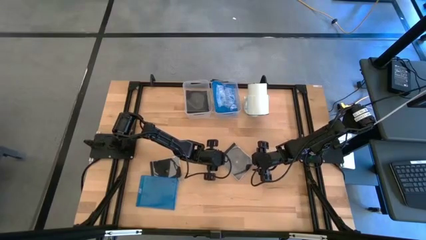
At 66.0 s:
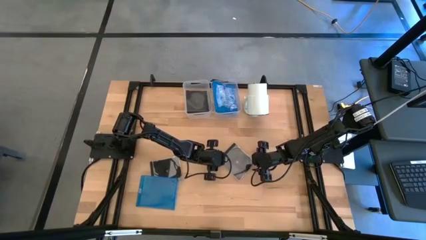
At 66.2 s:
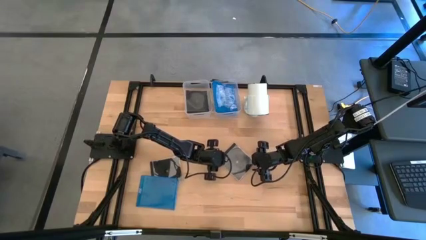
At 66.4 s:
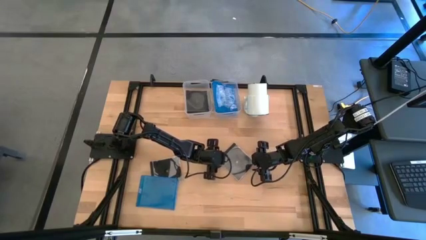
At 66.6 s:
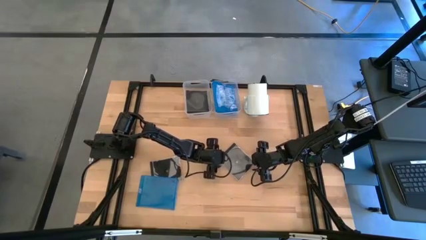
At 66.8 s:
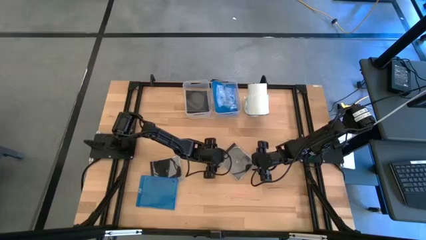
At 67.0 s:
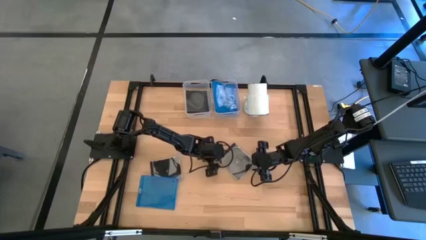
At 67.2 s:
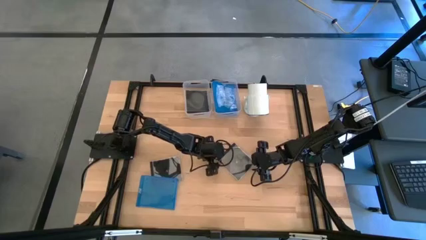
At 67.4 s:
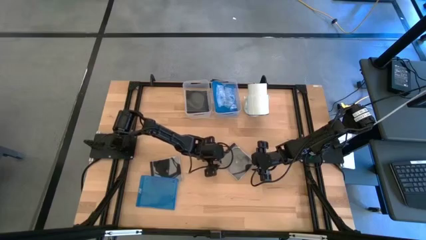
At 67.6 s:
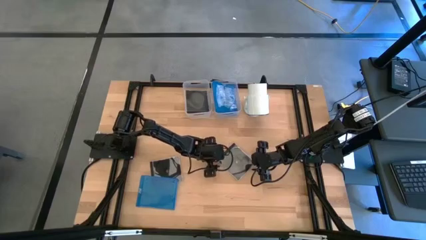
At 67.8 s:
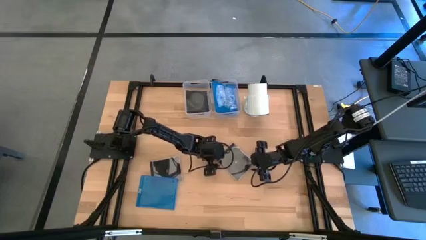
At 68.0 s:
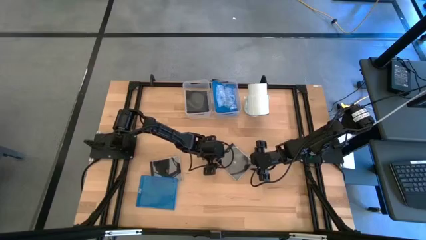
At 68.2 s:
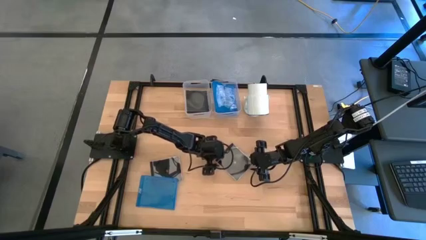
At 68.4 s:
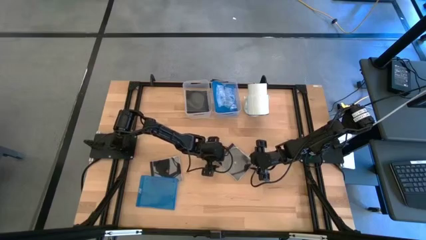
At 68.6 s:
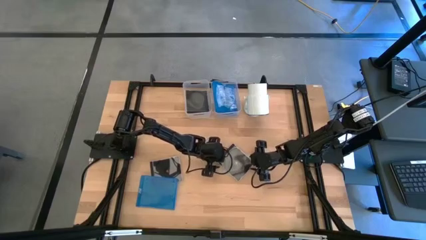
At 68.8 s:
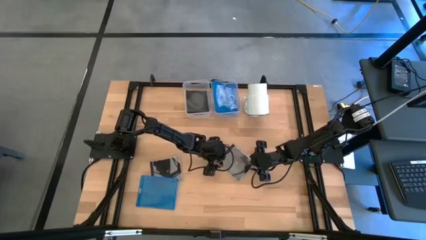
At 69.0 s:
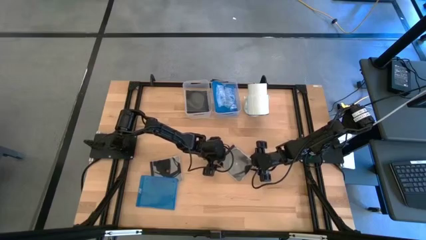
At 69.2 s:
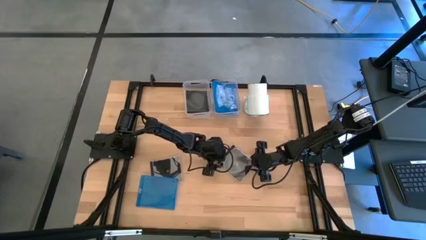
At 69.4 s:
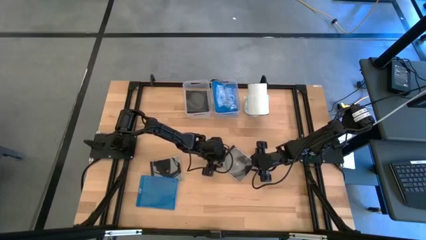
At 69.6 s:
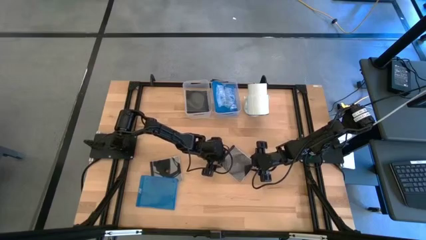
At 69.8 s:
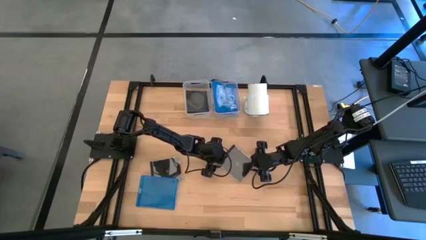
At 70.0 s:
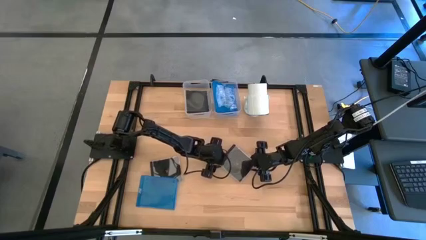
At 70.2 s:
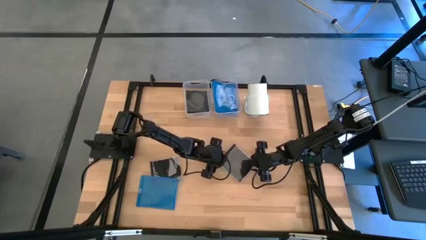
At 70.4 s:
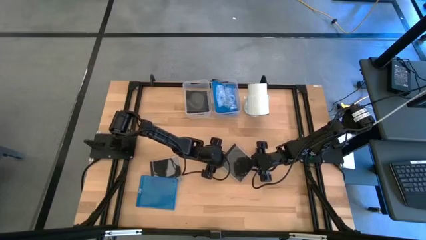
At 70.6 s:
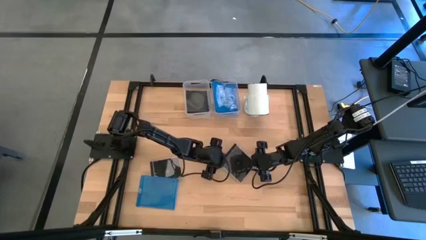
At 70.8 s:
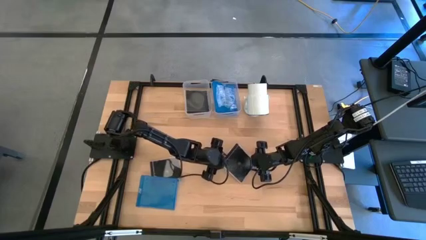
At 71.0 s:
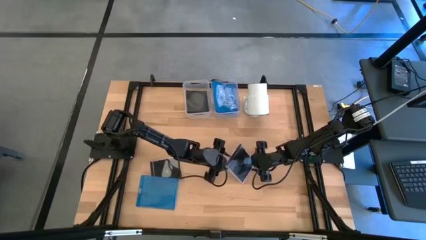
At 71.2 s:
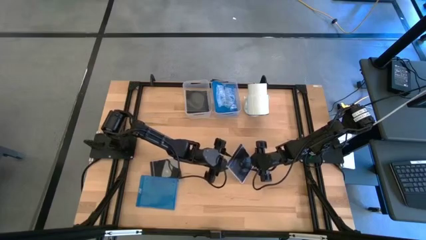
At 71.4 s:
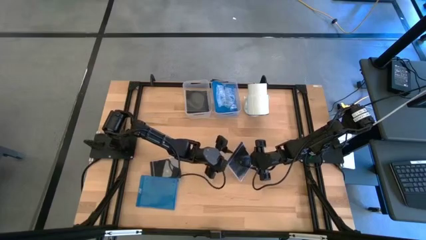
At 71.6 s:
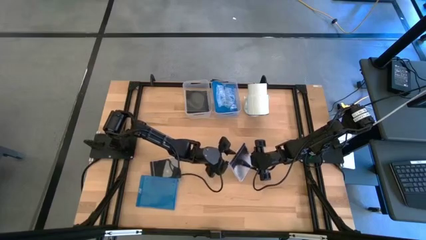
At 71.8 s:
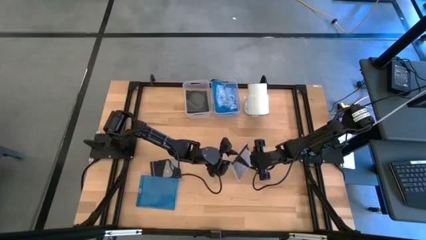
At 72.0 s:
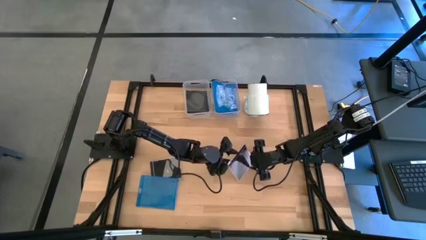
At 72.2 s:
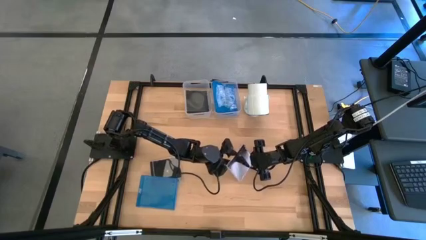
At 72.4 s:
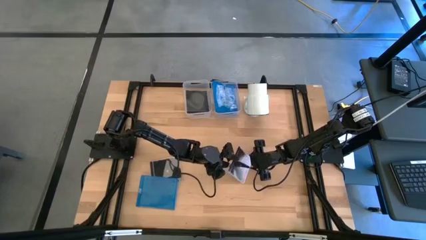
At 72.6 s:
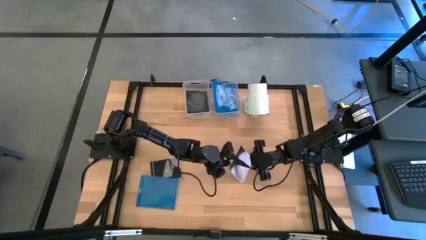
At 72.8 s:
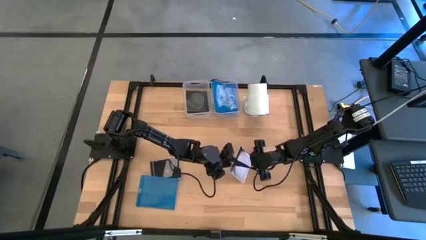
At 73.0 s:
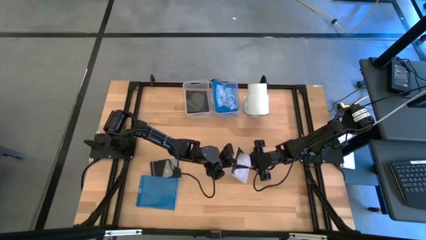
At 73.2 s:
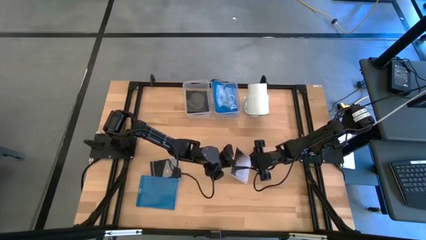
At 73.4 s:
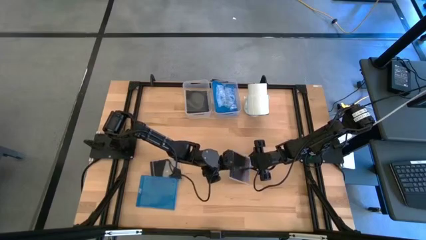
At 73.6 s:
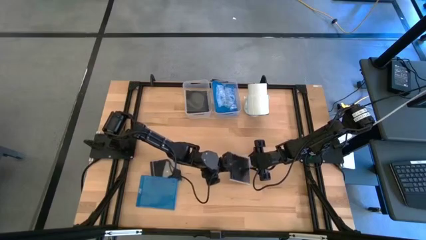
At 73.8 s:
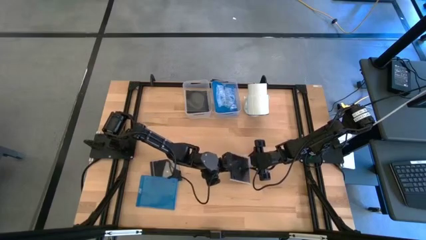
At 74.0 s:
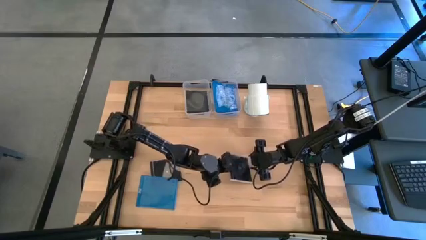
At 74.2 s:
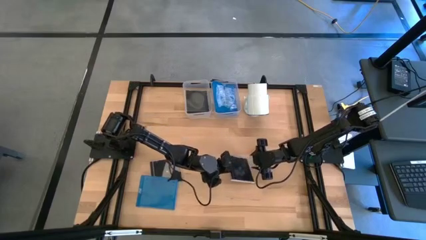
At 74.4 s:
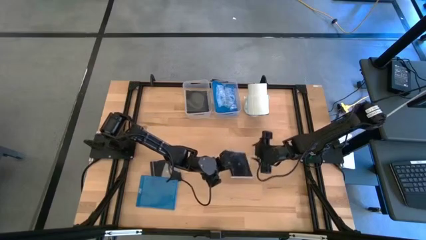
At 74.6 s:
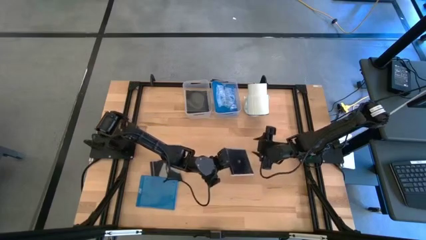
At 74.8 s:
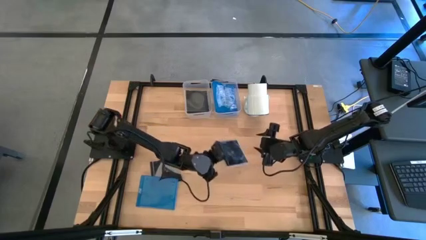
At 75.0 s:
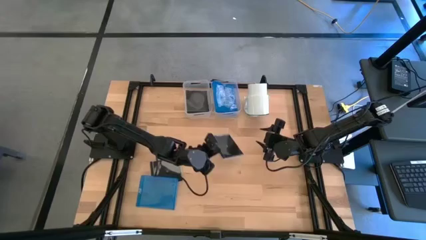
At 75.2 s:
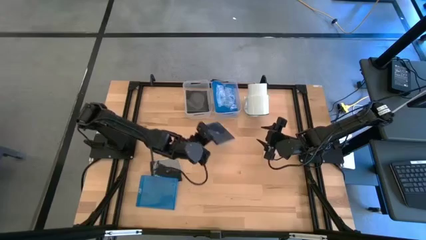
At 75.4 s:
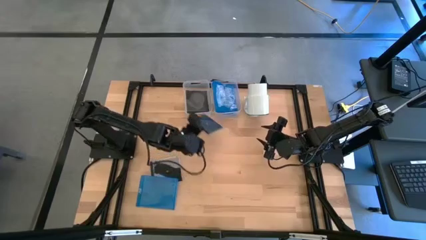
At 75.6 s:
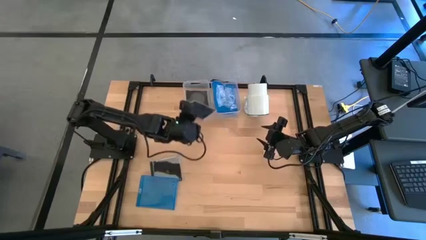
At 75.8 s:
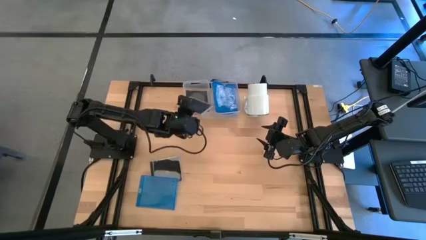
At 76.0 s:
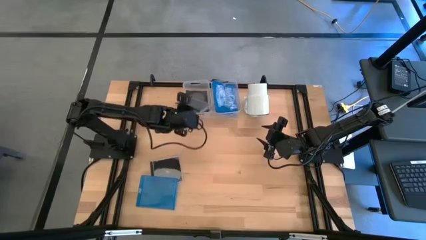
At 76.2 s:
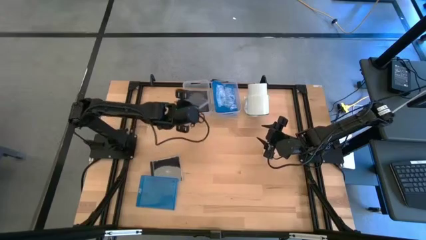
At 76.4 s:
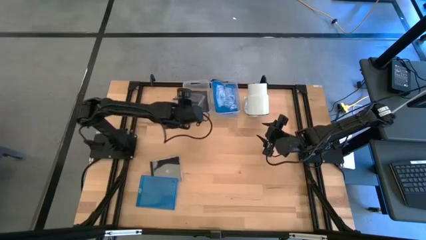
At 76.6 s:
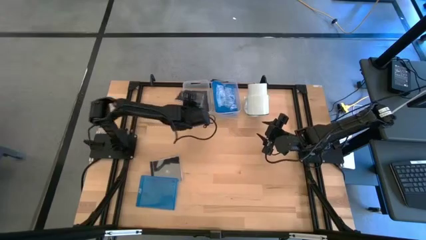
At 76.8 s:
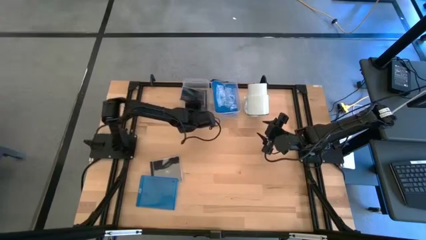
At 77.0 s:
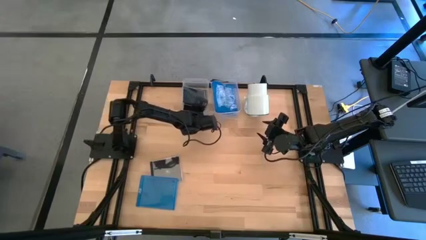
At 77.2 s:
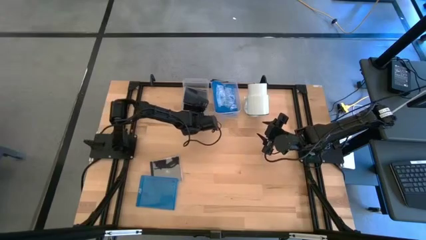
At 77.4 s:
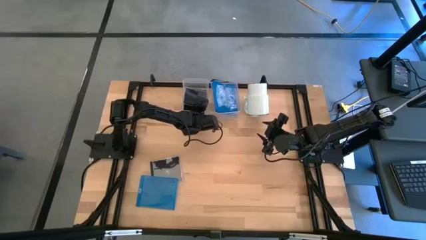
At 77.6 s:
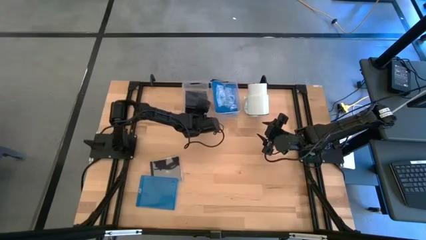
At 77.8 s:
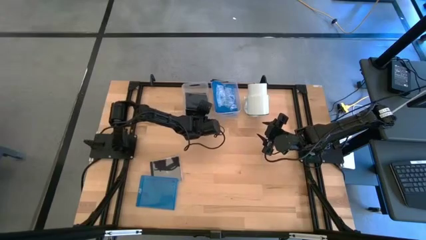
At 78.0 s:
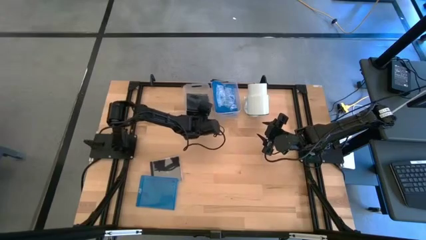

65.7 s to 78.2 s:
Task: Pick & place jewel cases by type
Put the right black CD Case into the left transparent bin

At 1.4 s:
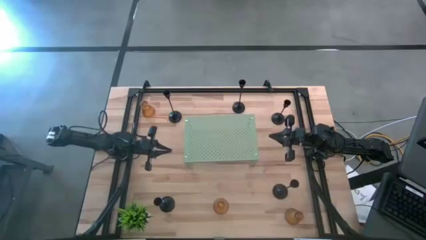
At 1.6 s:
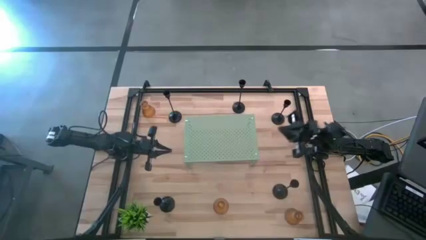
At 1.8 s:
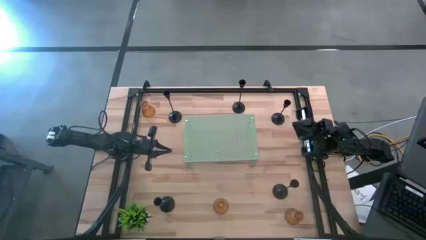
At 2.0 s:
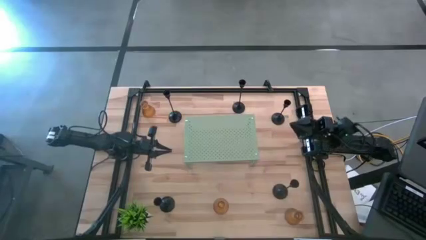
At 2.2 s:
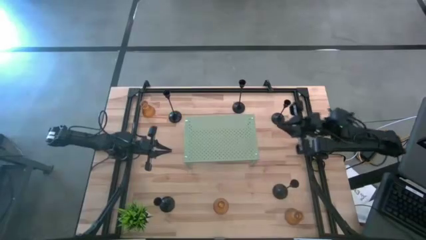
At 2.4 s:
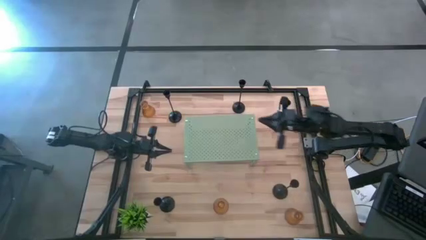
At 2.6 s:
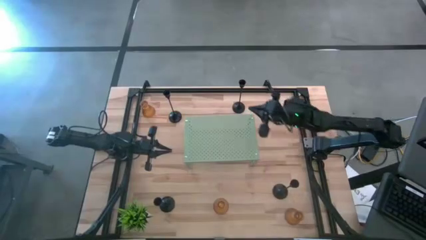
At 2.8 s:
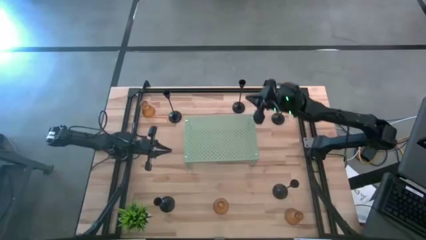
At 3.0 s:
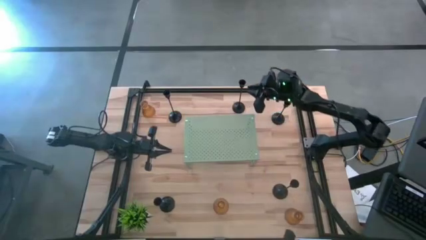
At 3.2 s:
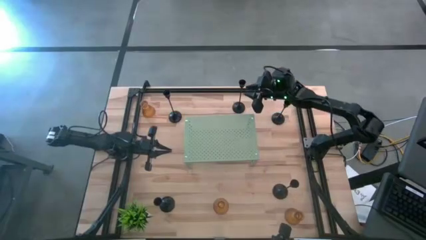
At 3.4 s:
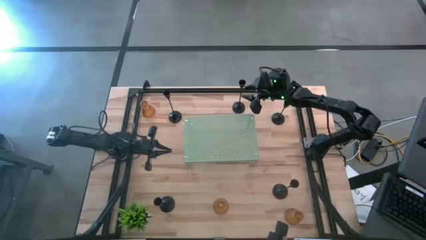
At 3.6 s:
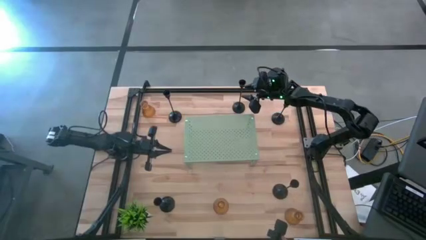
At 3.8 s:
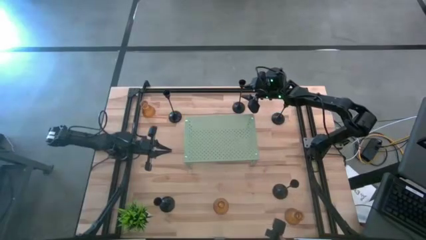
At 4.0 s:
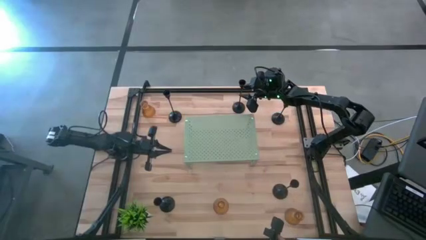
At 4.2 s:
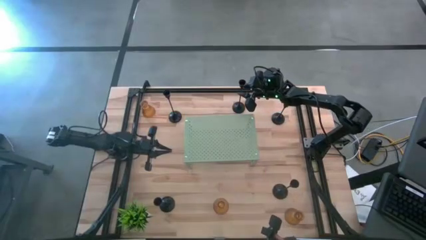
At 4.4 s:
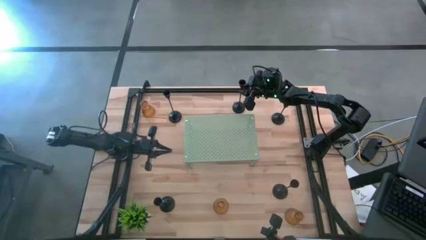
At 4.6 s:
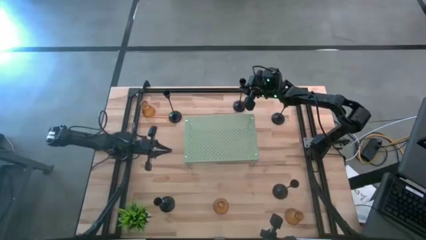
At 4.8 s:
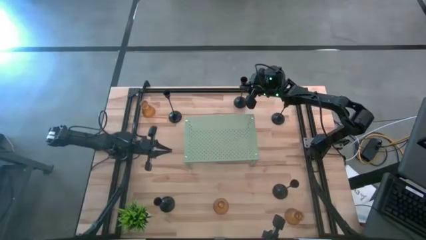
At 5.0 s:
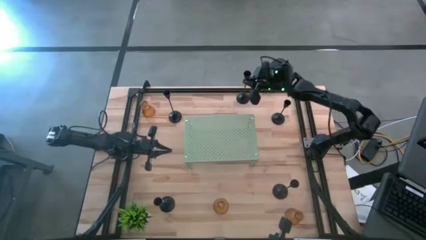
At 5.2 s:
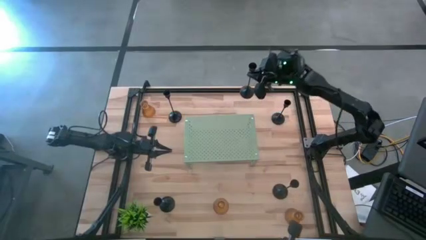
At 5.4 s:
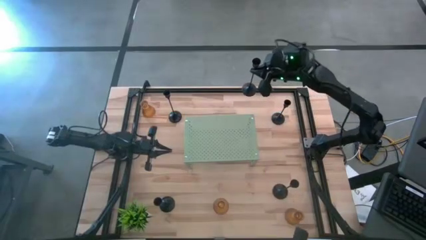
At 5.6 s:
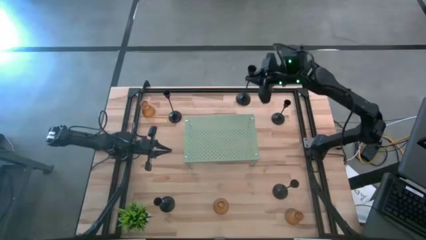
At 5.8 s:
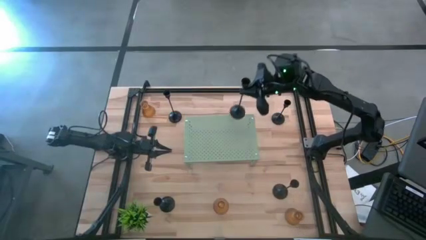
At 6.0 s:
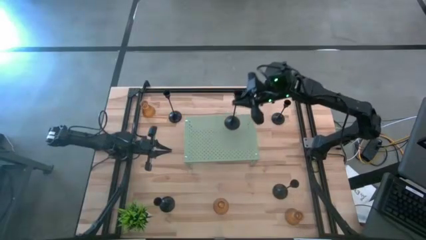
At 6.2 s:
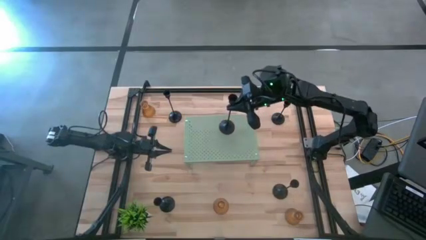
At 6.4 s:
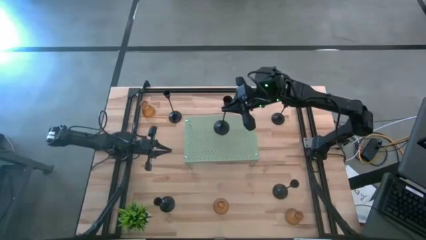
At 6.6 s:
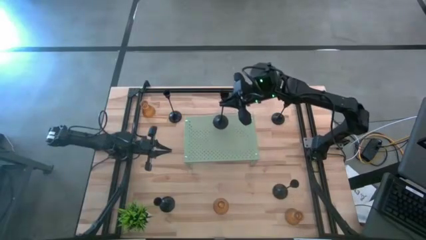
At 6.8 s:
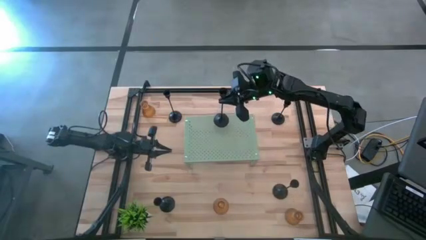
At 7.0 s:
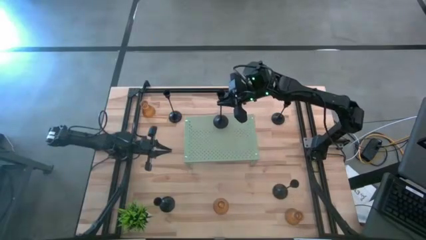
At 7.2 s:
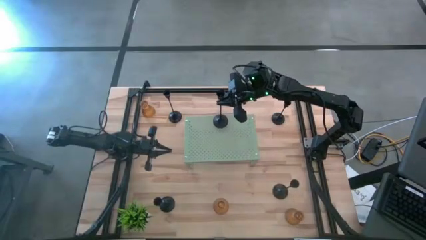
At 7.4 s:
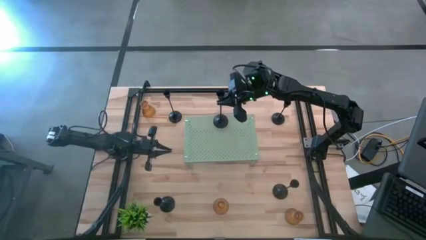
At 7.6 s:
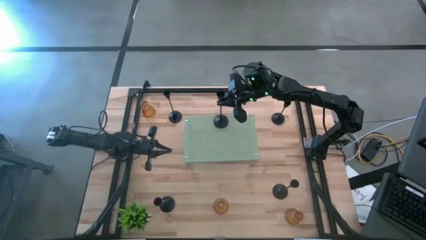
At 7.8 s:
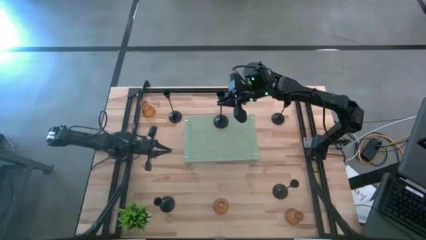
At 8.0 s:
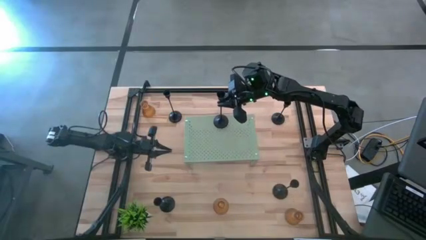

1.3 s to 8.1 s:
Task: Pick & Place candle stick holders
Put the black candle holder on the shelf
